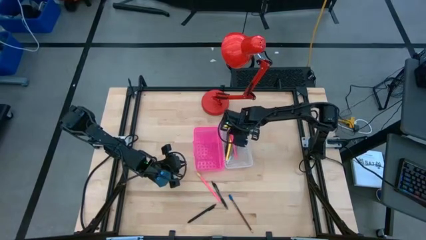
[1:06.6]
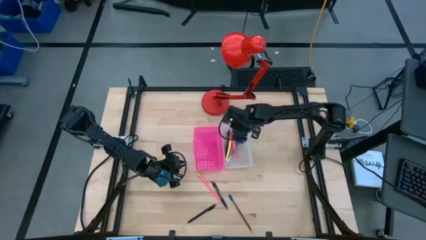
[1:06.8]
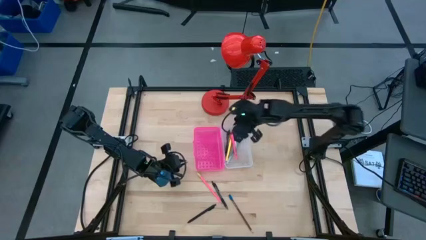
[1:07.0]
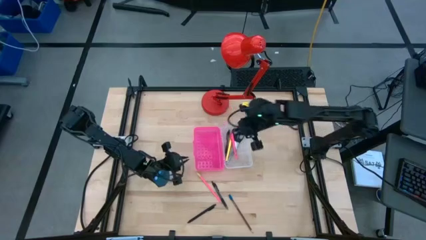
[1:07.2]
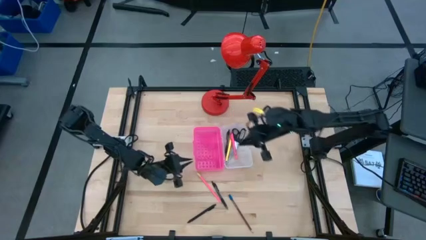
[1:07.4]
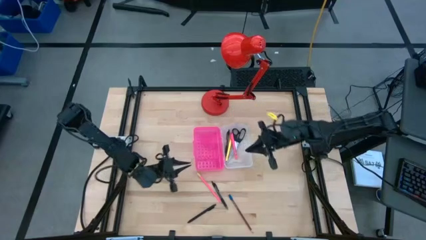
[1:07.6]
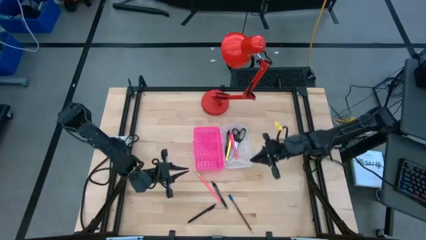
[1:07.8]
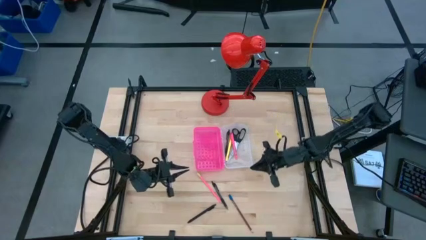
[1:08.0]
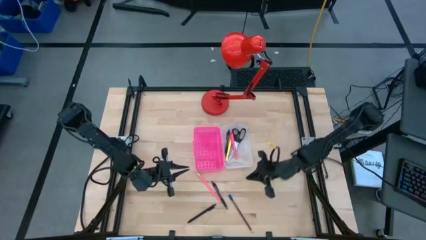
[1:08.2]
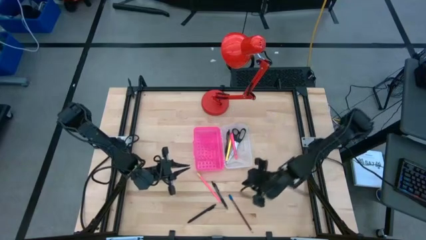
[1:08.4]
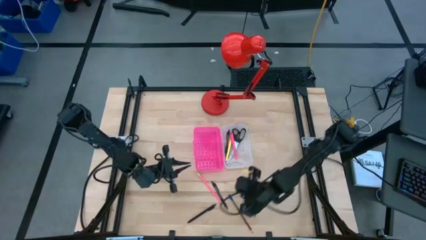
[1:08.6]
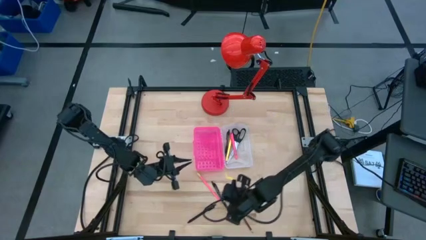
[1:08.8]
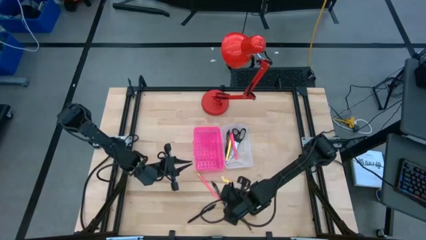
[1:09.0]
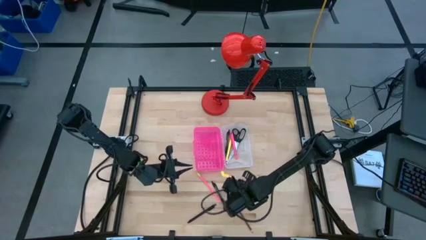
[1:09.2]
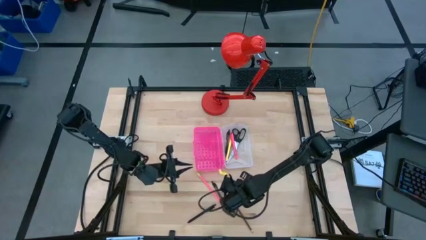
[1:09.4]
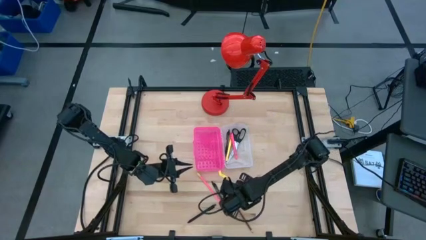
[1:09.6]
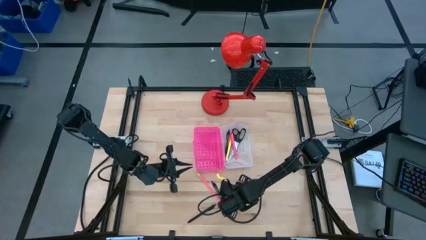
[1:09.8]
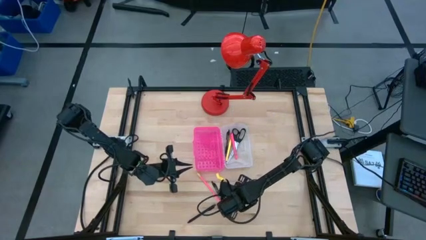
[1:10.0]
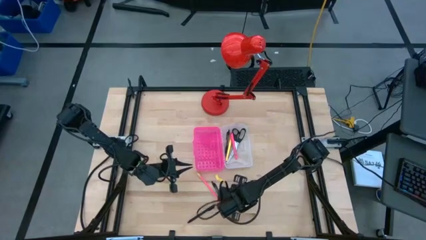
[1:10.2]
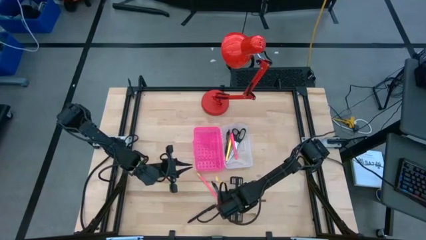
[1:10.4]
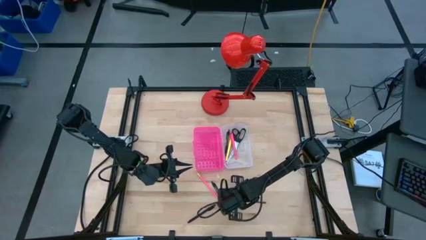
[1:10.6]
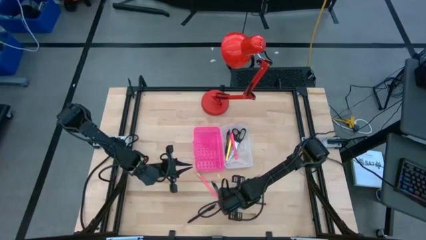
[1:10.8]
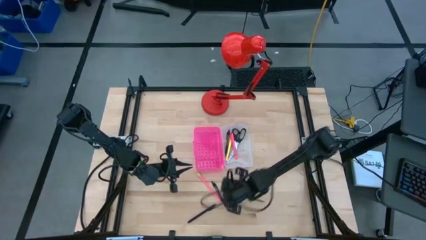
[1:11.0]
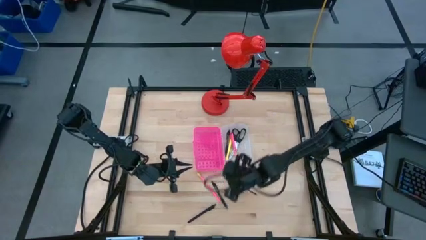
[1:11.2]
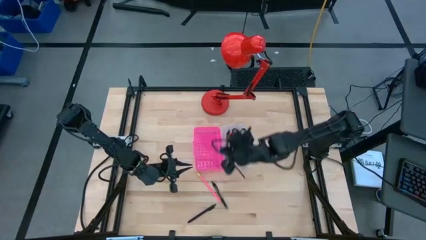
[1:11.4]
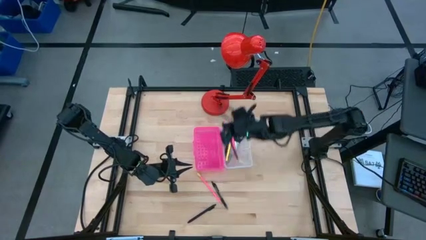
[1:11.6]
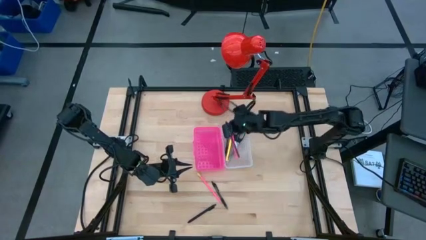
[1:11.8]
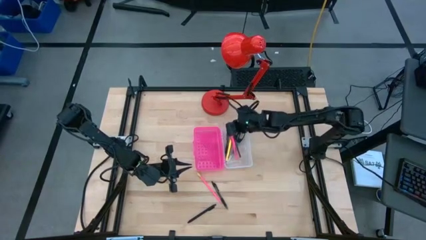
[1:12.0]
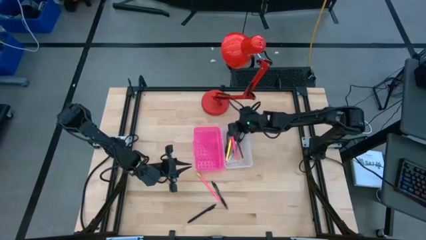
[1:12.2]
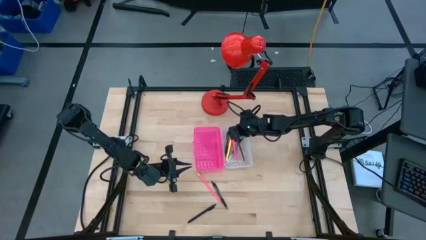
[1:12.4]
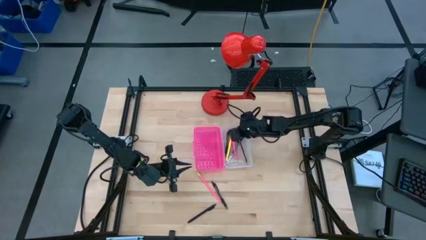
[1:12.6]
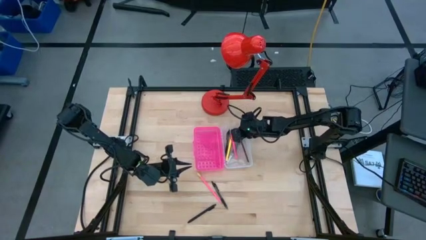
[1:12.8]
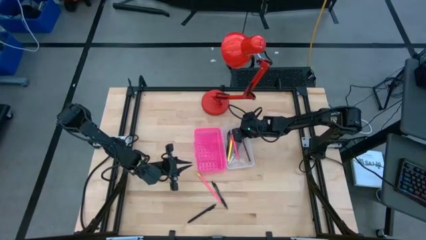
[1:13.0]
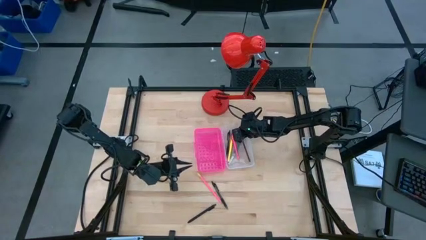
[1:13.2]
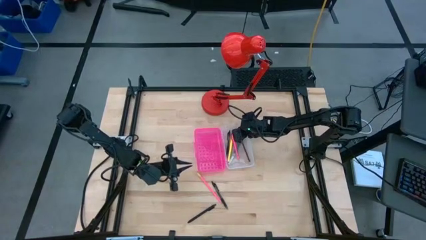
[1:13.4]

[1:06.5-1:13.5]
Task: Pick & place school supplies into a supply box
Put the brown pencil into the pink supply box

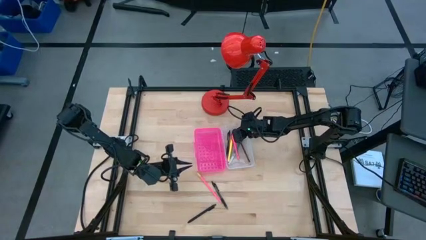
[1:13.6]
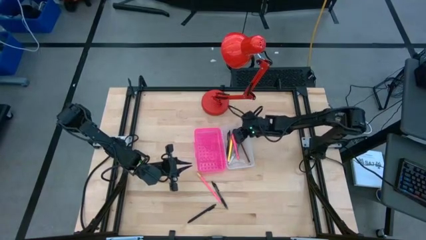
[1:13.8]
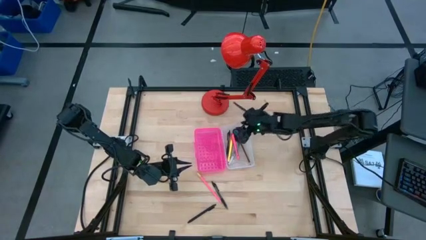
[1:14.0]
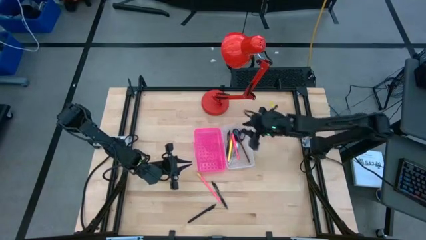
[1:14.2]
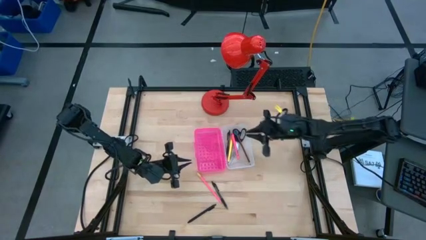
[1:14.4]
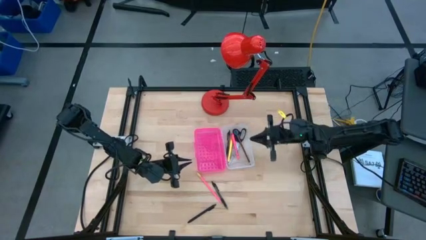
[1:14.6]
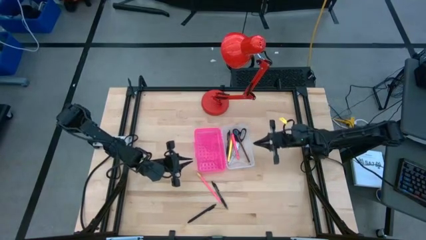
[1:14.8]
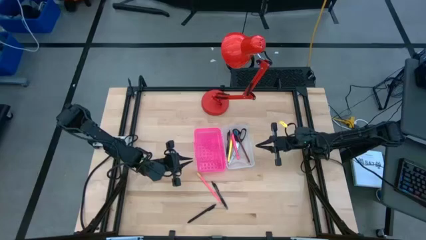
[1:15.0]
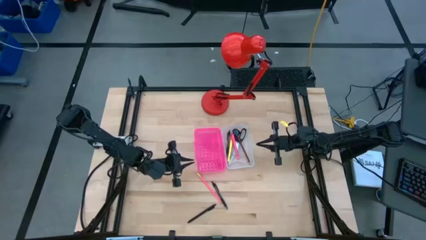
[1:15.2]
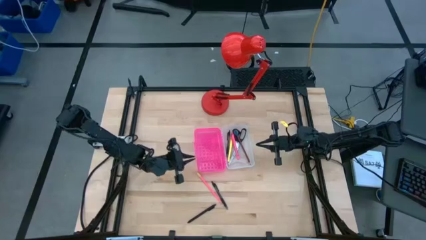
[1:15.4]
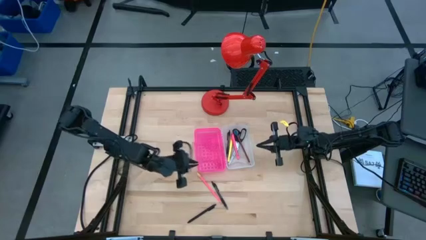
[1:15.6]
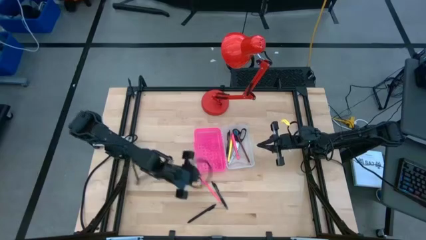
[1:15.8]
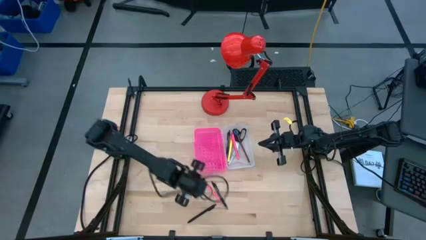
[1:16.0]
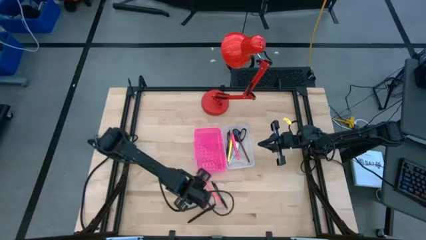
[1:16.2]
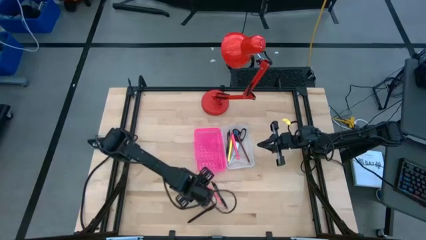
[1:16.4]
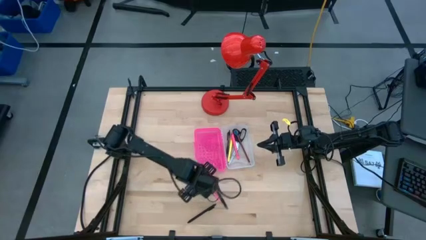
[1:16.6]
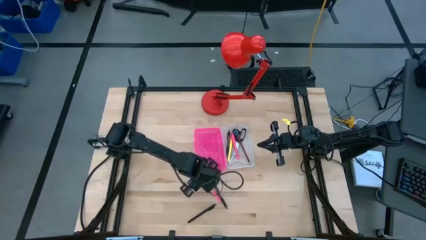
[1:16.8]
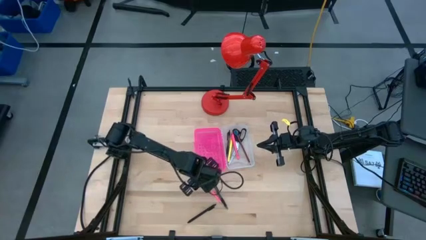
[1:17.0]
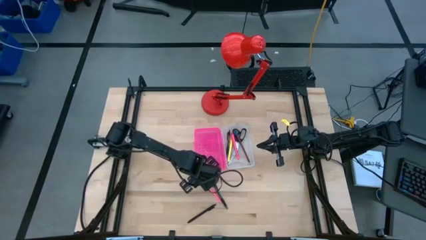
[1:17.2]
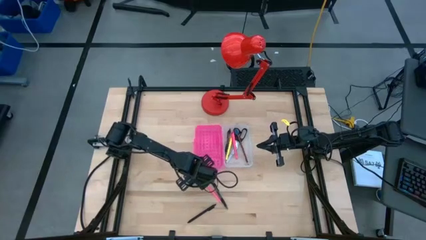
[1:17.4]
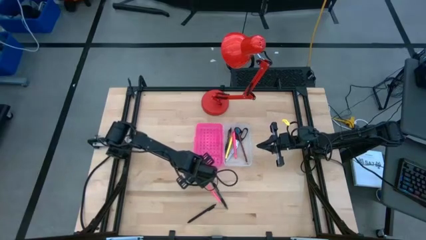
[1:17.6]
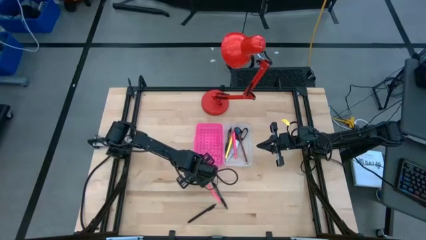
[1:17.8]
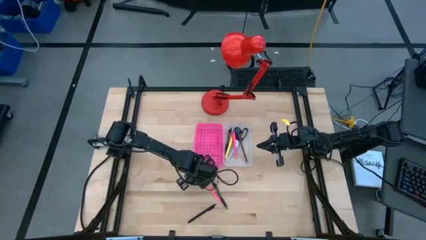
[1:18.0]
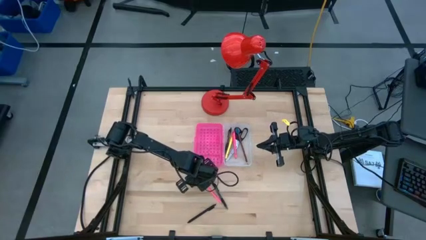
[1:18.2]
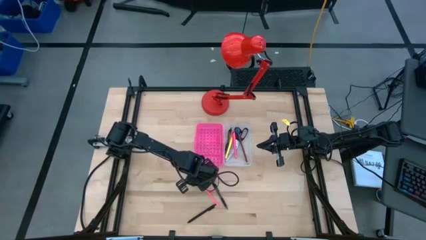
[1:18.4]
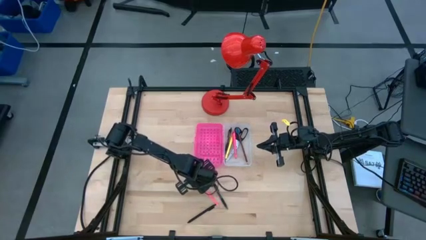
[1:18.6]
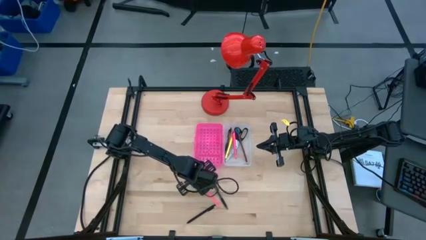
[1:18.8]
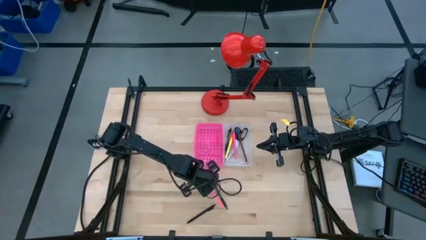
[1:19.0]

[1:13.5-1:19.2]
Put the pink pencil into the pink supply box

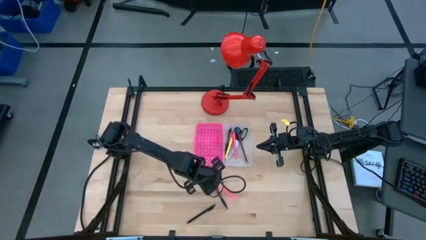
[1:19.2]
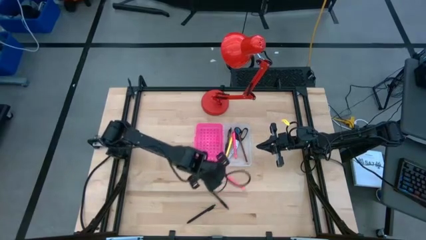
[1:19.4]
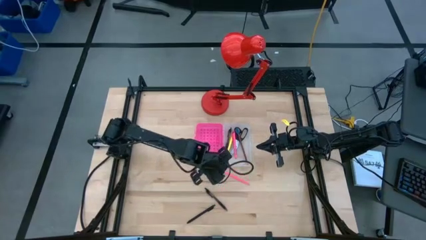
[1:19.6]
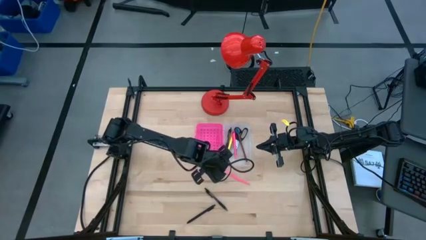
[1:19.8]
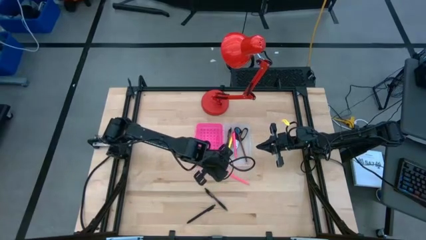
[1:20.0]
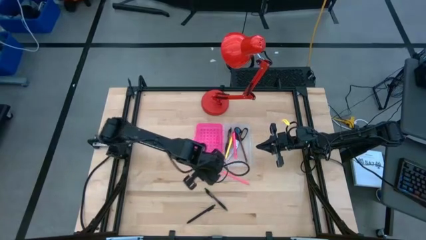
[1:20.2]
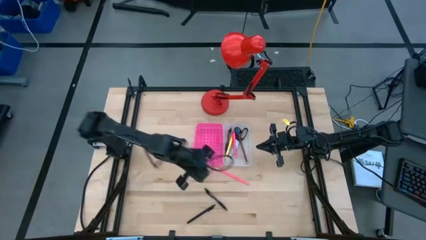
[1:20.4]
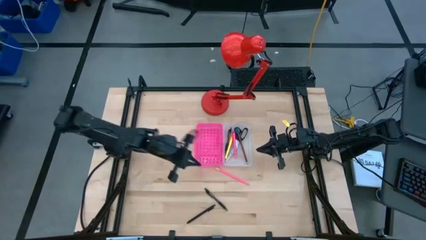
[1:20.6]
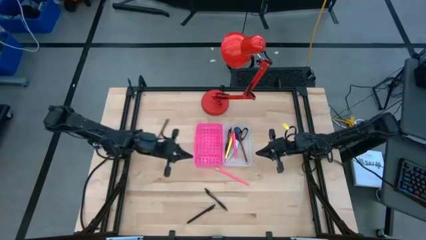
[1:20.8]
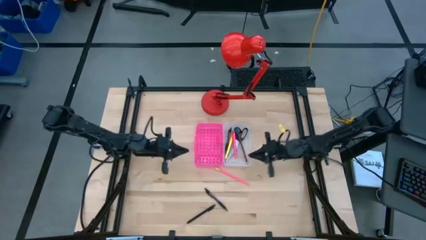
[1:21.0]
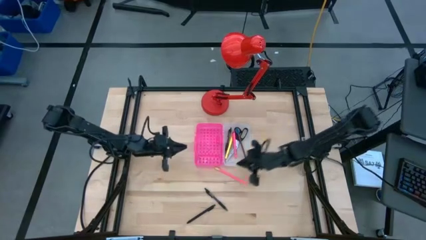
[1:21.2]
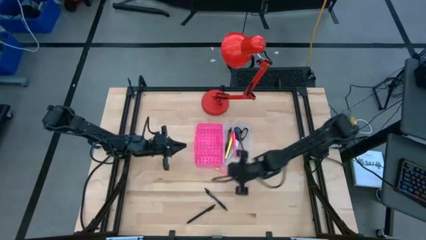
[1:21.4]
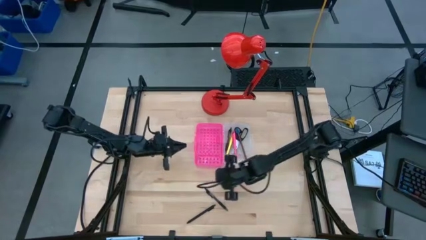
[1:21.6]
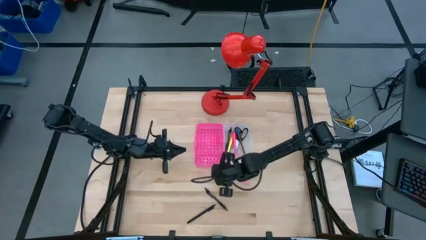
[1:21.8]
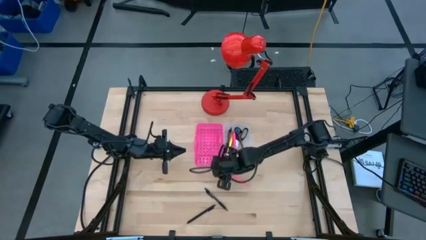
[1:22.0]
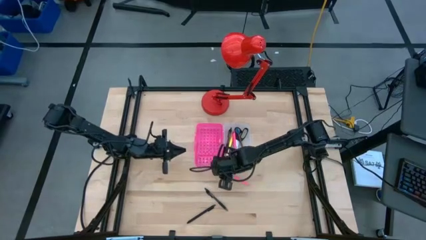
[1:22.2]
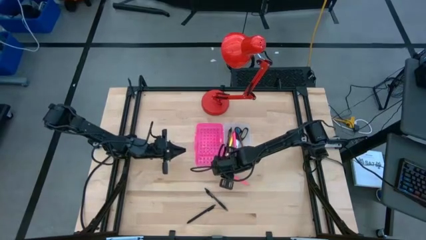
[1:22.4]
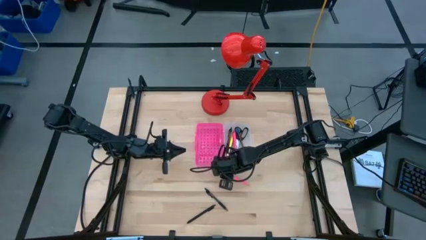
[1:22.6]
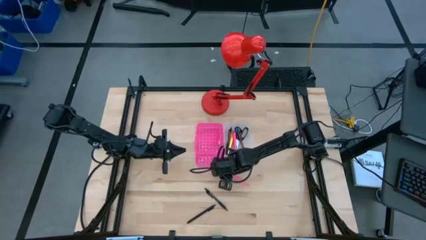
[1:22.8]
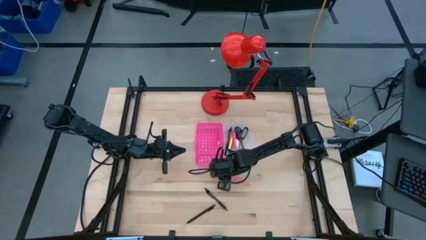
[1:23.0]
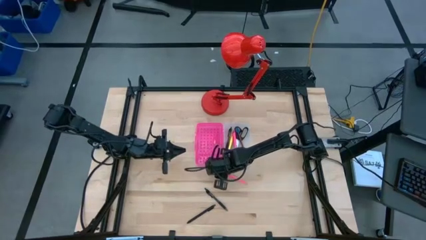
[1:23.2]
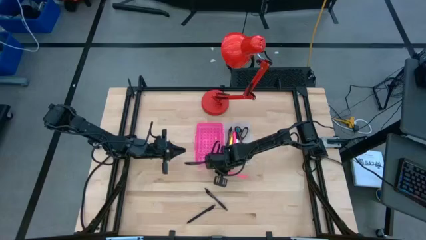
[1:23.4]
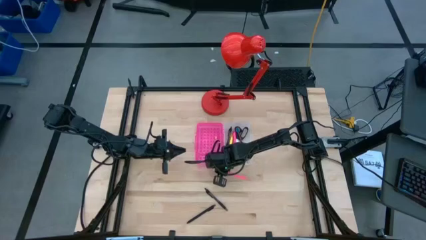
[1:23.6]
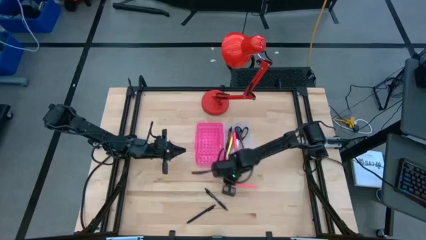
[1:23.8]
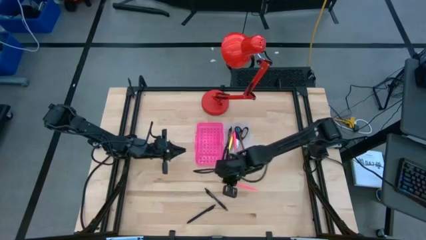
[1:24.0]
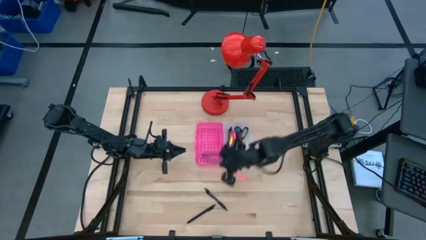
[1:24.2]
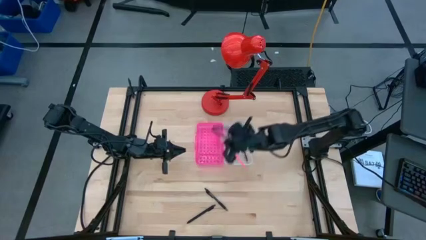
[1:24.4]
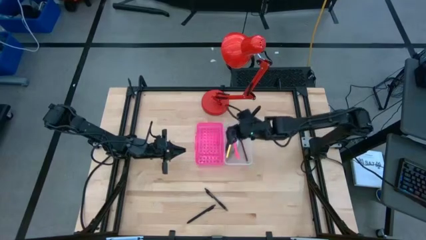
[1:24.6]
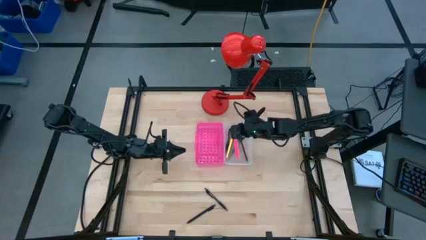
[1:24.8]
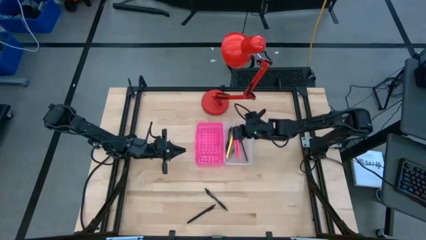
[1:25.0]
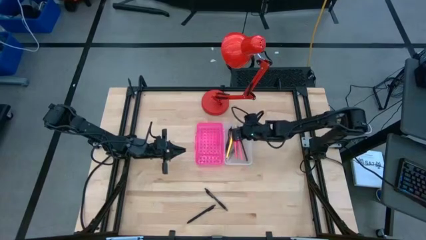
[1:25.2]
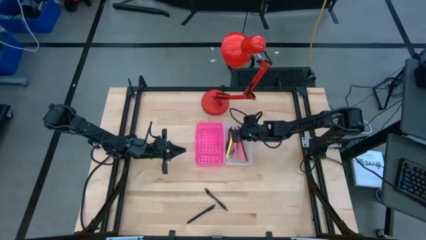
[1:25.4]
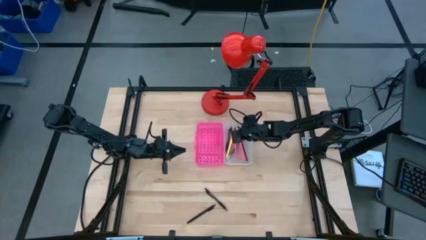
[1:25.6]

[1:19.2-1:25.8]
Put the pink pencil into the pink supply box
